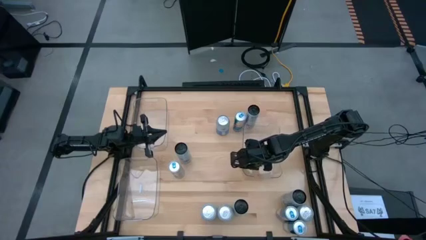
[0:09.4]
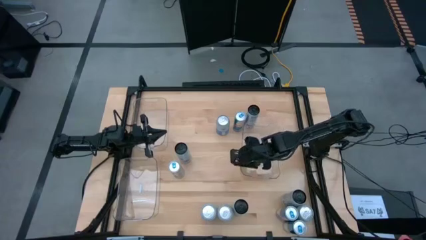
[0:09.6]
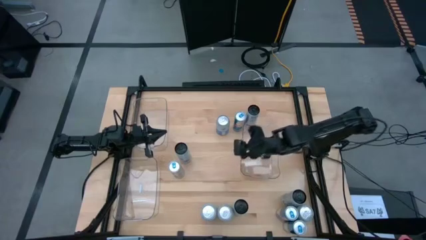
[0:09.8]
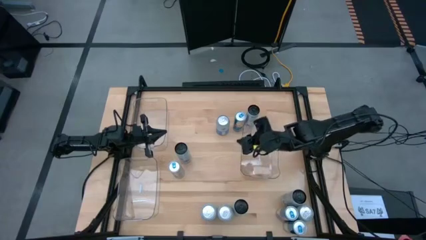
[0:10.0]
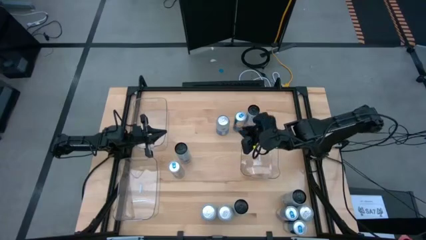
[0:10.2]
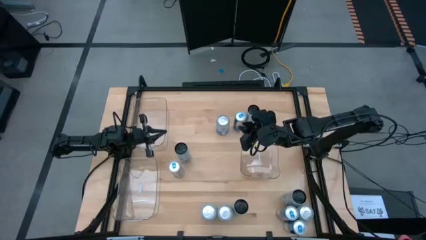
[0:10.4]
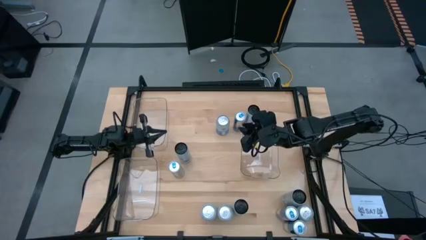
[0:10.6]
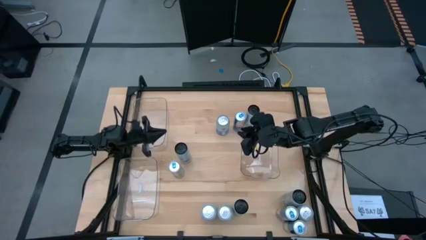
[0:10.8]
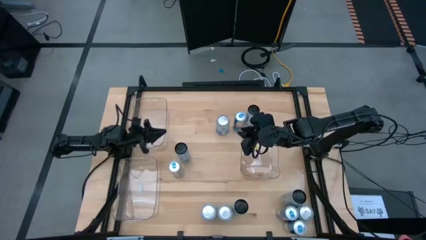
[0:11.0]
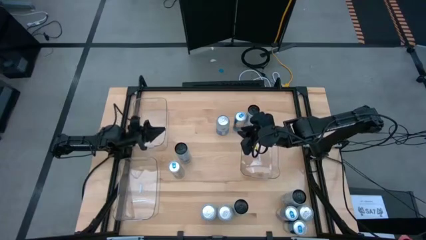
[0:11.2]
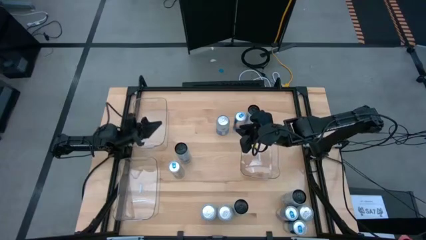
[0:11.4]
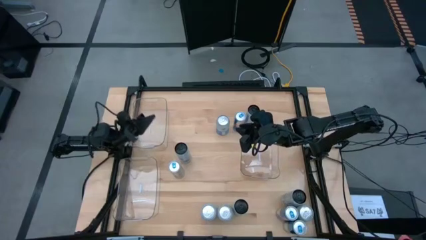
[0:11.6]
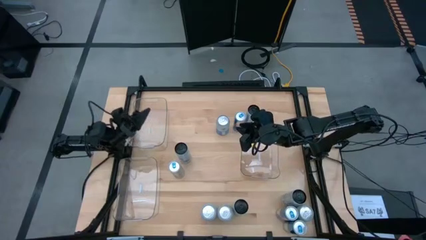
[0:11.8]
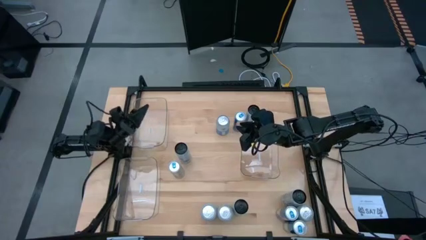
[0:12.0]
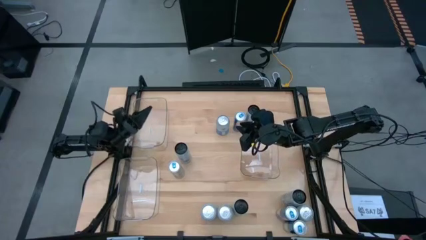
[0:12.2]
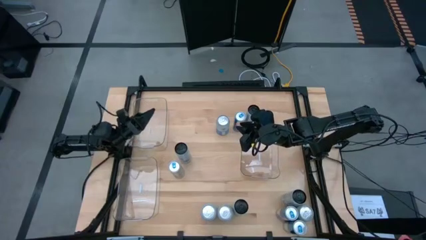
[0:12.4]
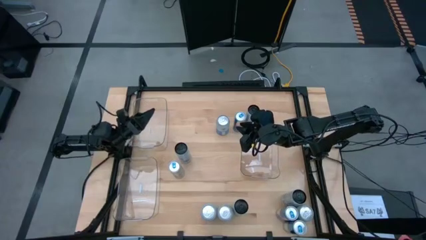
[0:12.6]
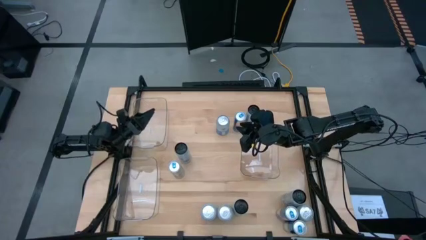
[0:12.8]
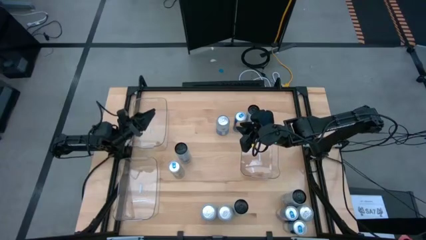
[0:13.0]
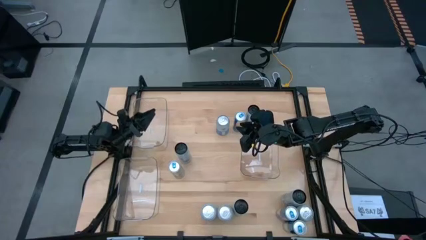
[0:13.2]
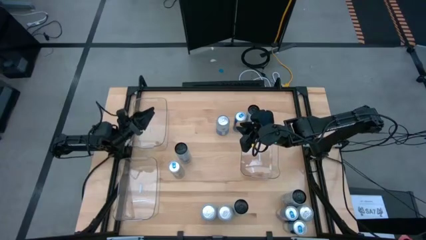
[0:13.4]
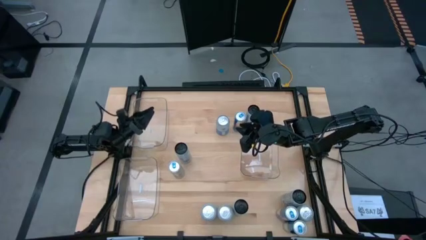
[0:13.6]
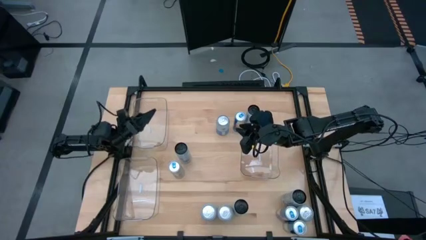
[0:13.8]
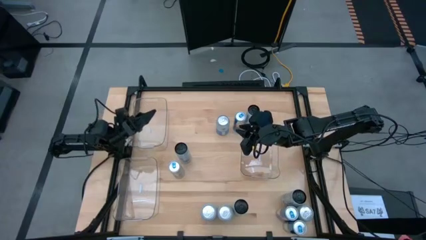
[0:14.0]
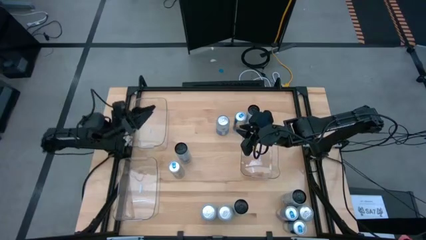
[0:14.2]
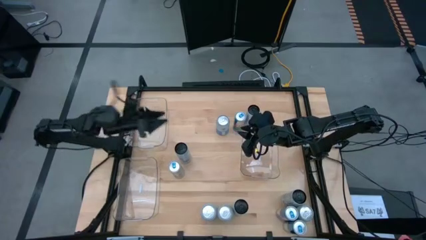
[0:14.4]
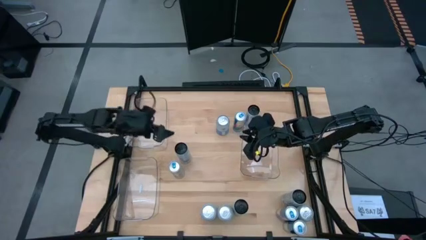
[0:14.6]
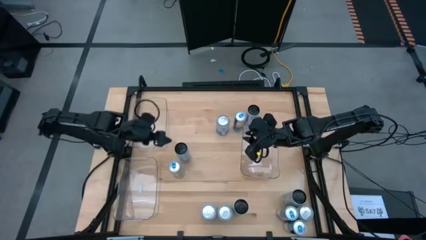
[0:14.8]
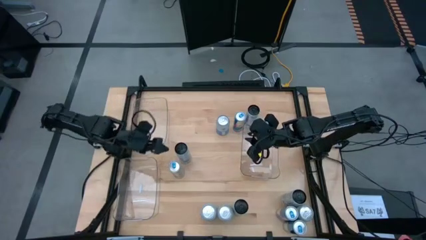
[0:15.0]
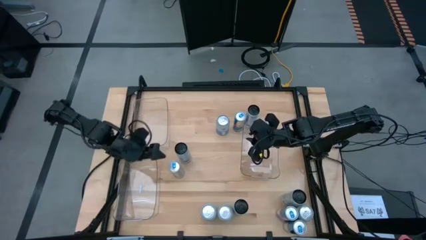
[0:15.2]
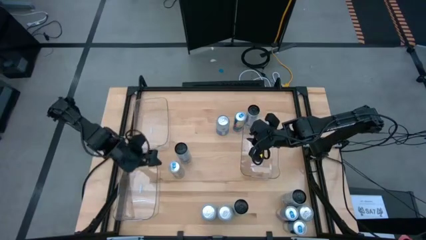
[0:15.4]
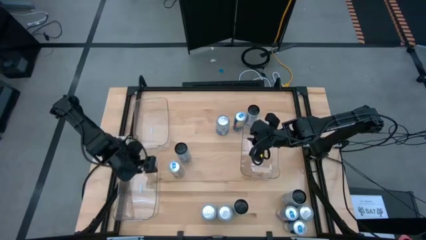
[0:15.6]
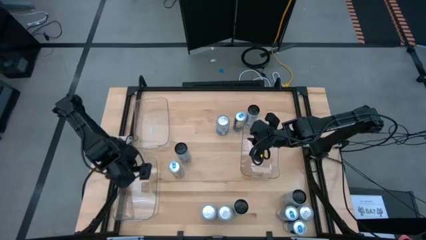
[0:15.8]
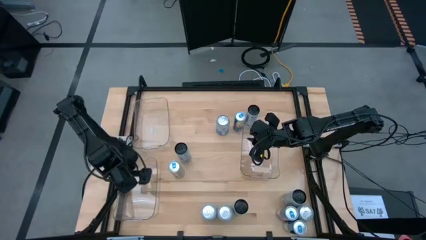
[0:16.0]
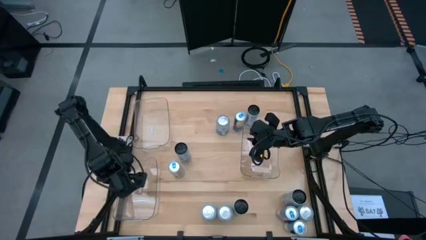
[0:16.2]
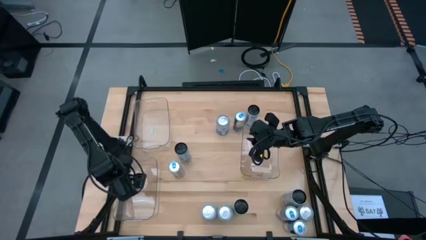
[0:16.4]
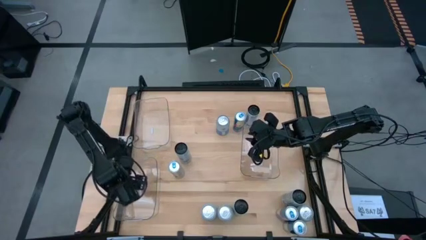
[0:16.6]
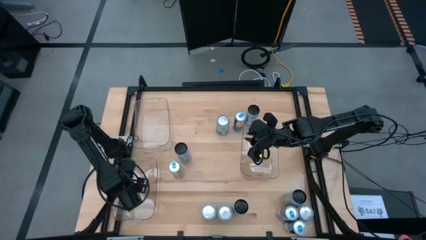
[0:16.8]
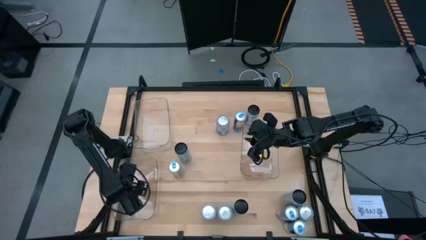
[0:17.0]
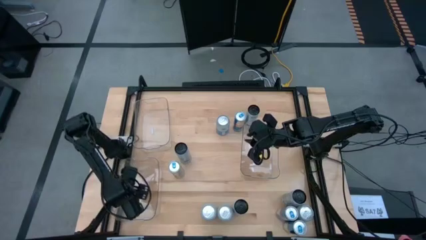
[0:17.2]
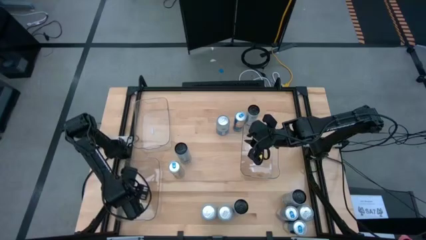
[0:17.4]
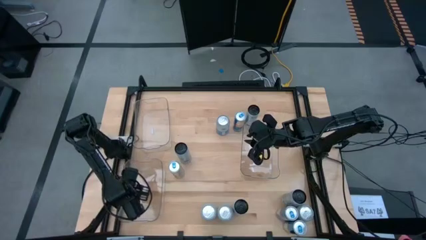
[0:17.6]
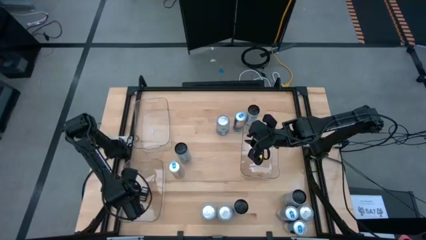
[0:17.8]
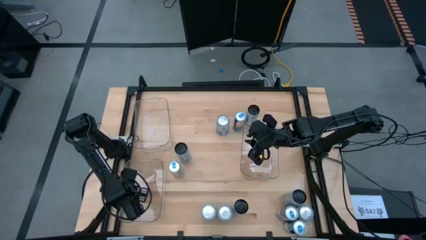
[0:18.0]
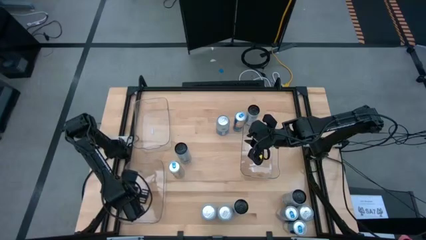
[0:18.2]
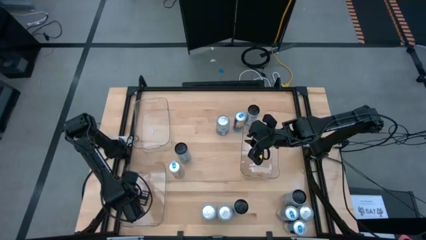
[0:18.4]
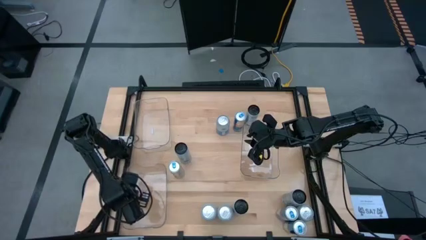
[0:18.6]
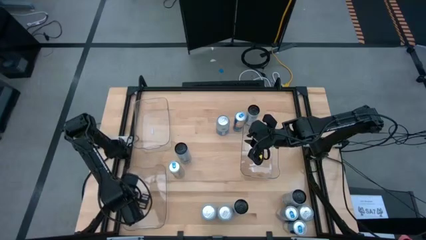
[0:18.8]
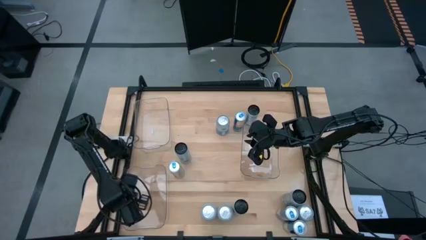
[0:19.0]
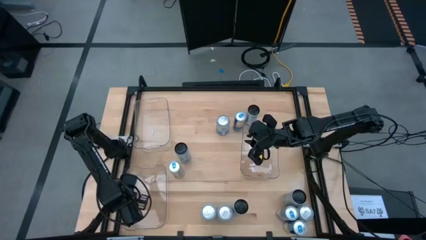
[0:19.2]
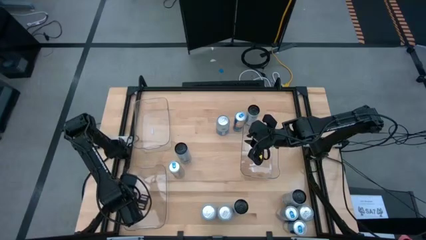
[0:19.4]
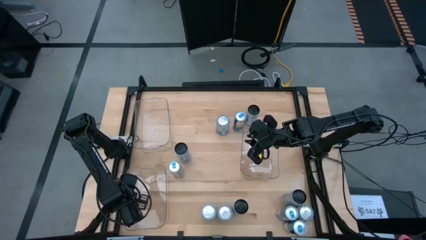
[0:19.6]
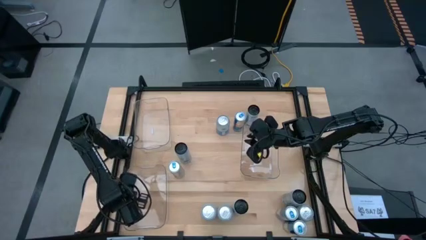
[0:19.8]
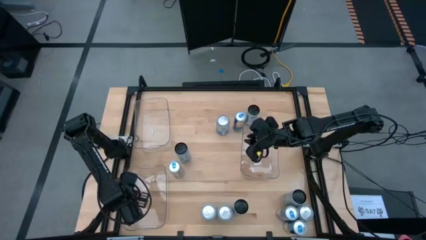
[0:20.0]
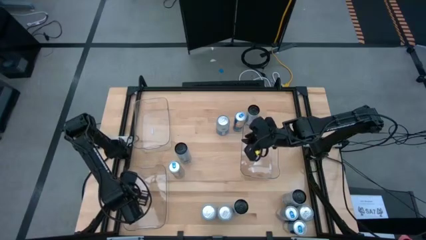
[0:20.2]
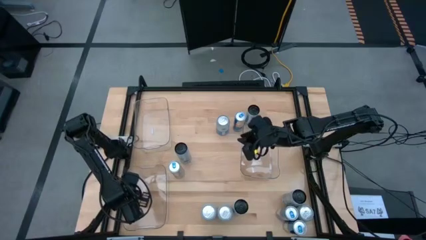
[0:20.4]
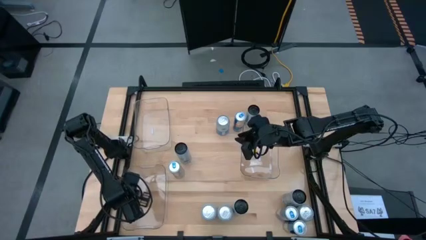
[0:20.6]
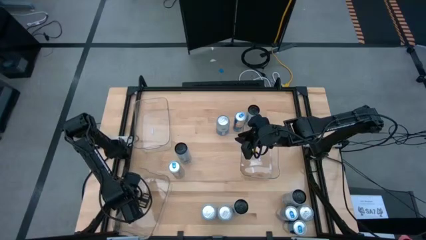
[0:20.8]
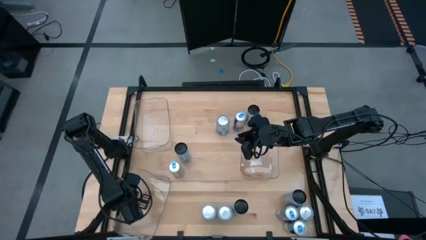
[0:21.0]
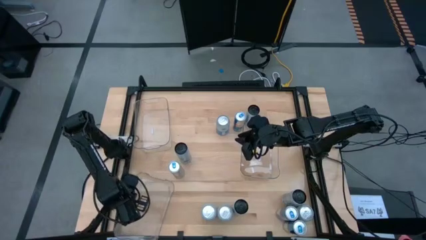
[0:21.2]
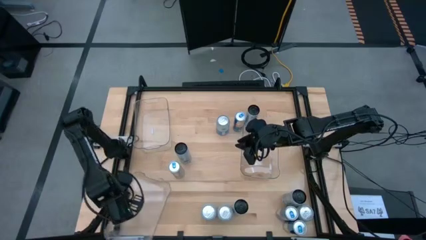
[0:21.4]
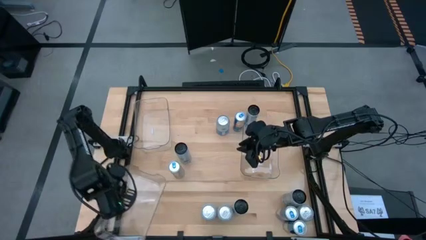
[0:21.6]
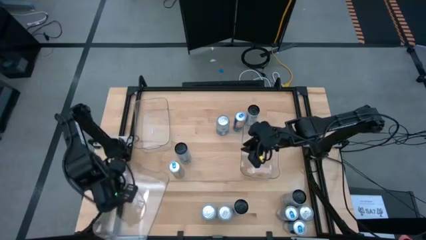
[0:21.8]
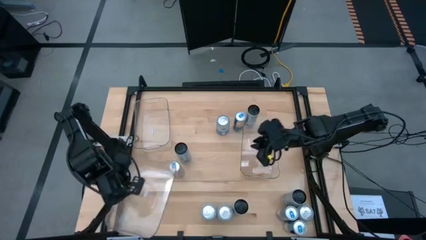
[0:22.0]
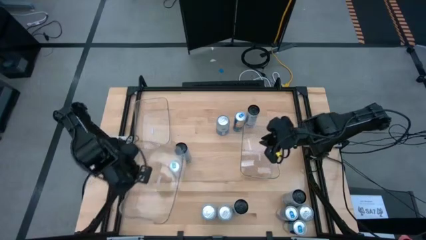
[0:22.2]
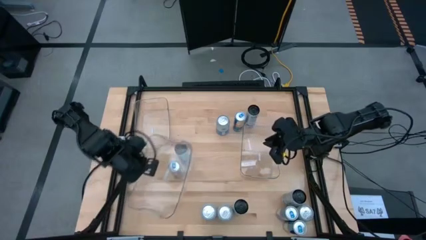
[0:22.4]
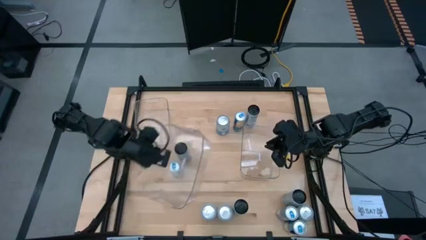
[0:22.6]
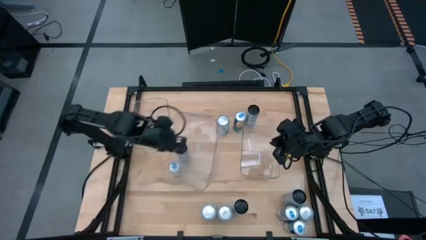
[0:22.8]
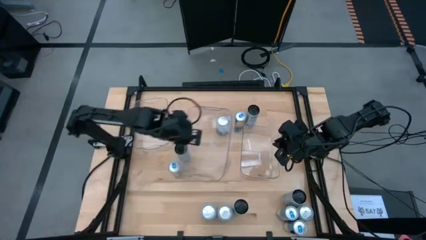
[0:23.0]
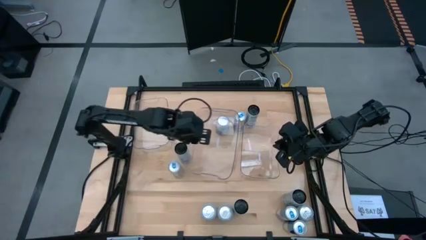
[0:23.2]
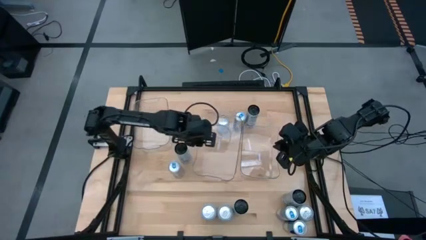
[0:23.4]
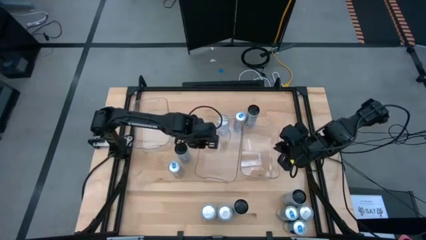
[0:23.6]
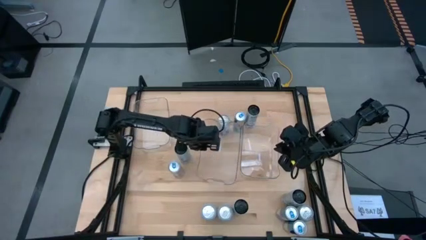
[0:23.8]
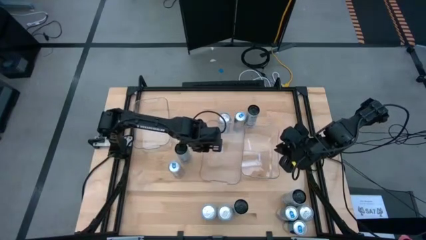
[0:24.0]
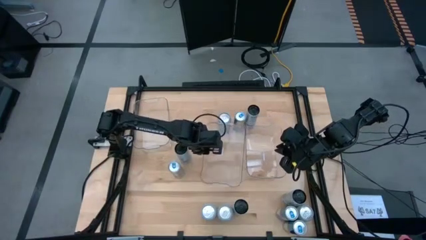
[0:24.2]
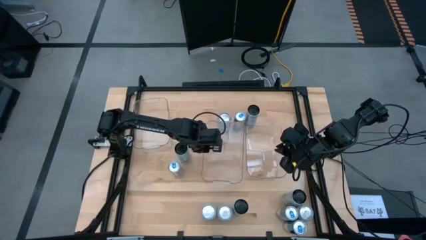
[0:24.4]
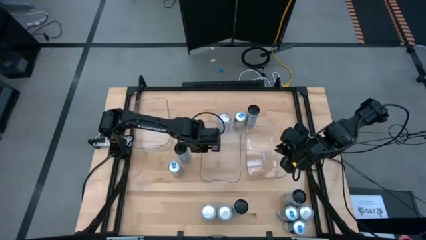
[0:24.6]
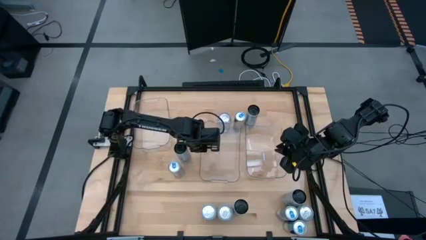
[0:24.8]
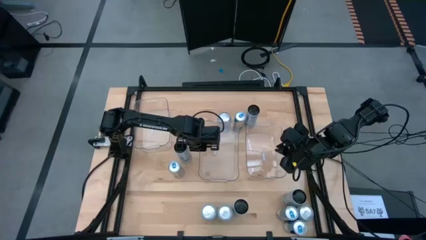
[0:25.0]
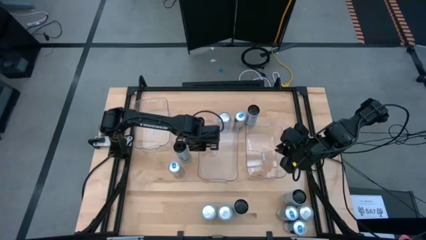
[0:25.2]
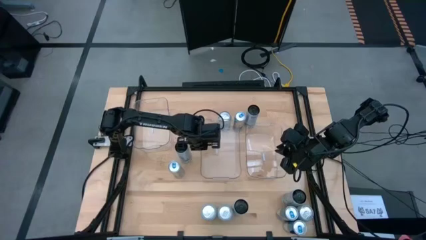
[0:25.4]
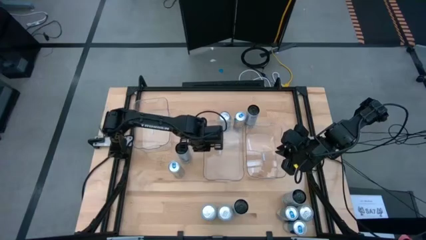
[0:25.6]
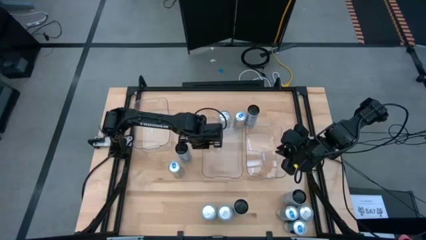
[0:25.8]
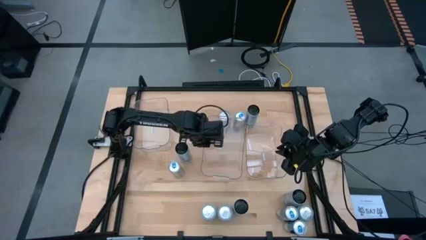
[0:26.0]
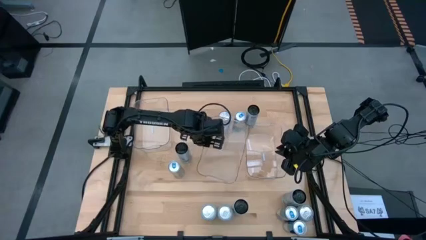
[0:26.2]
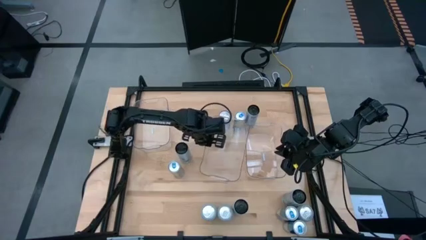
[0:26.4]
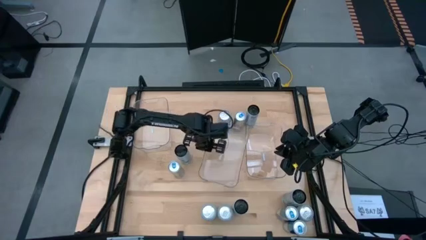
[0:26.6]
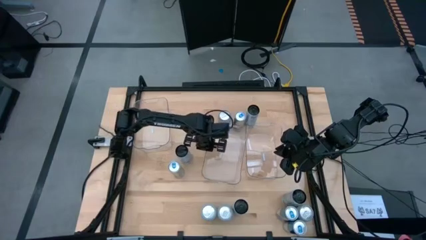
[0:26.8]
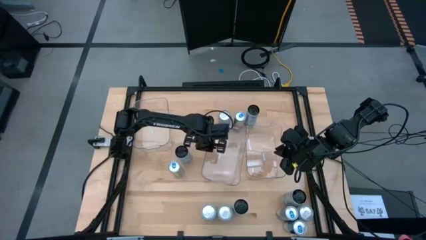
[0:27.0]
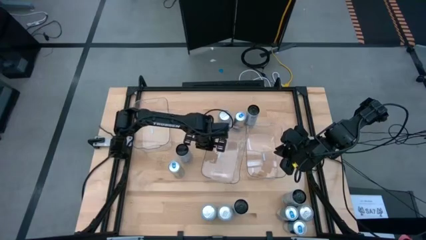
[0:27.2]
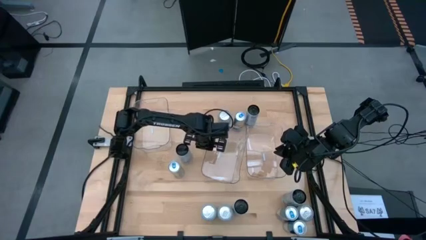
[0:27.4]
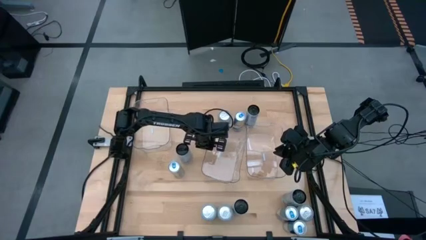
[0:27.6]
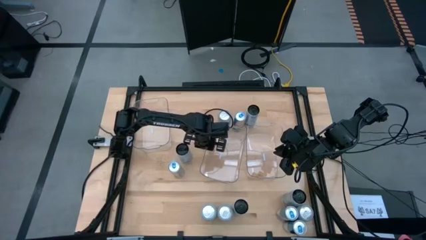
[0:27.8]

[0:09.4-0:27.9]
Task: Sort soda cans
Move the bottom transparent bin to the center of the table
